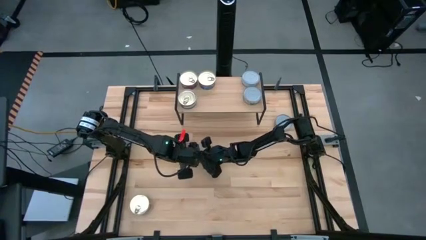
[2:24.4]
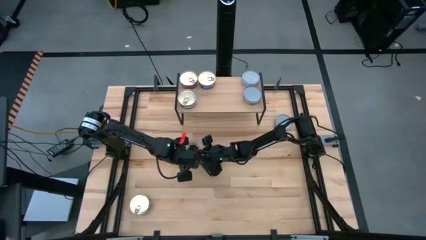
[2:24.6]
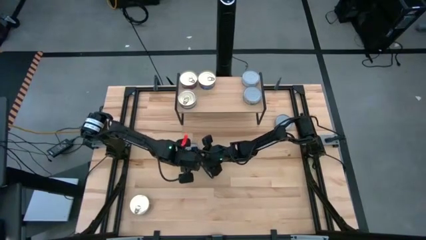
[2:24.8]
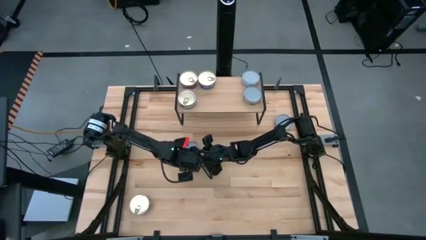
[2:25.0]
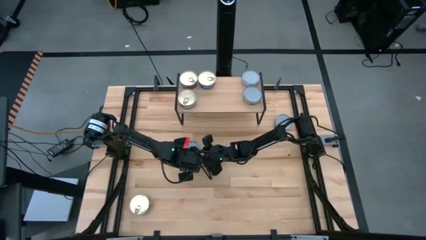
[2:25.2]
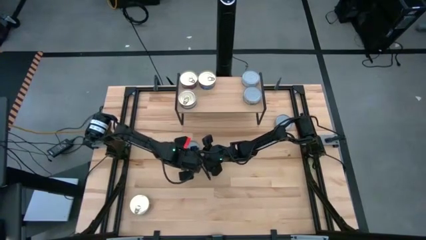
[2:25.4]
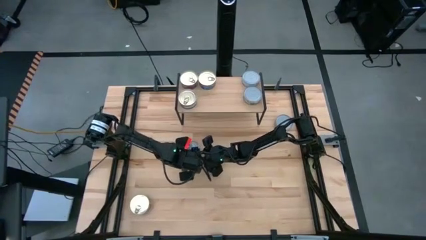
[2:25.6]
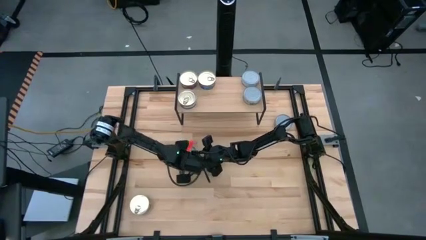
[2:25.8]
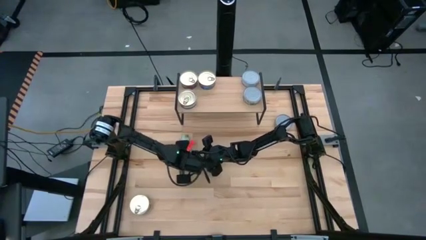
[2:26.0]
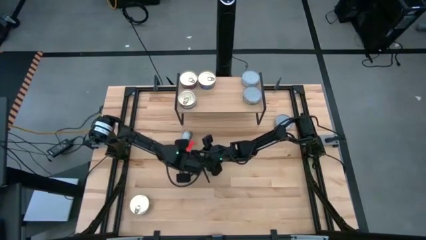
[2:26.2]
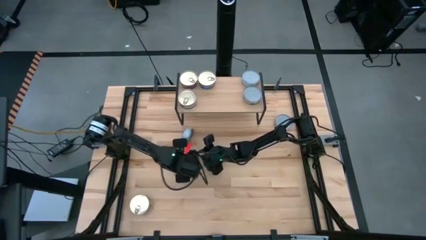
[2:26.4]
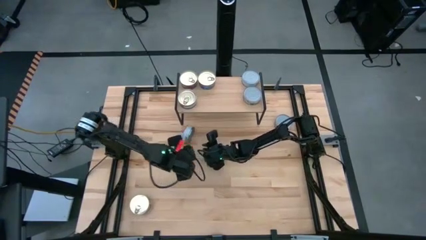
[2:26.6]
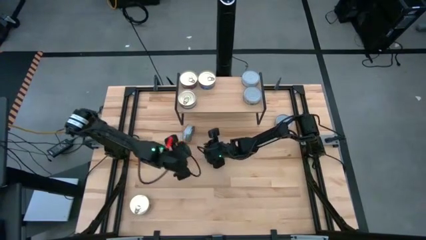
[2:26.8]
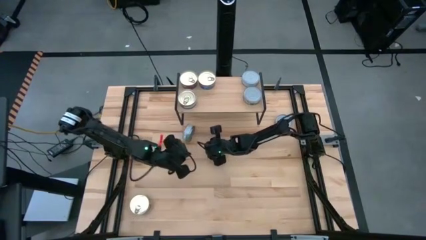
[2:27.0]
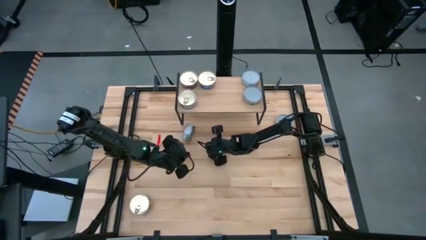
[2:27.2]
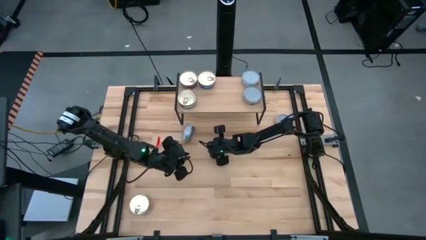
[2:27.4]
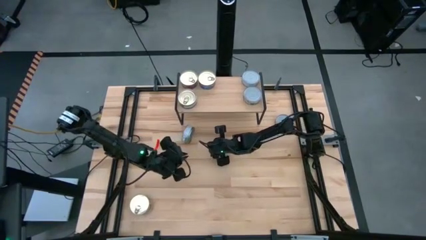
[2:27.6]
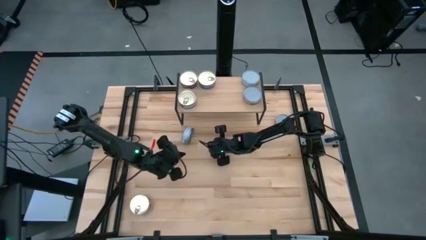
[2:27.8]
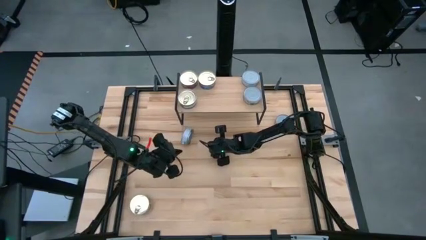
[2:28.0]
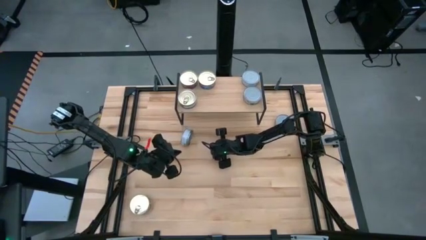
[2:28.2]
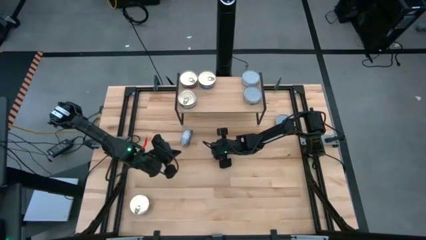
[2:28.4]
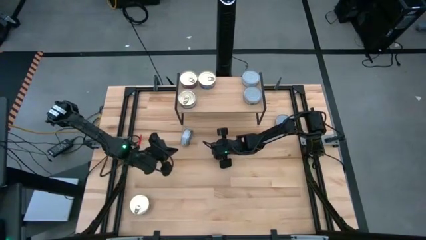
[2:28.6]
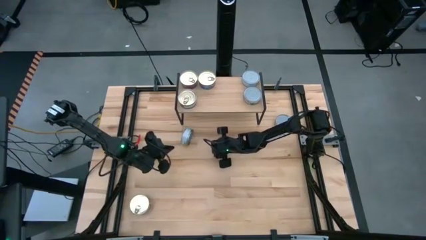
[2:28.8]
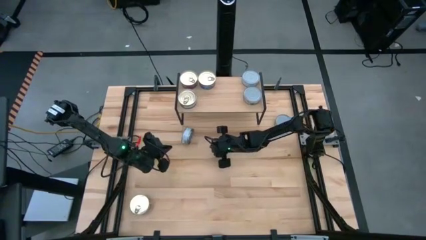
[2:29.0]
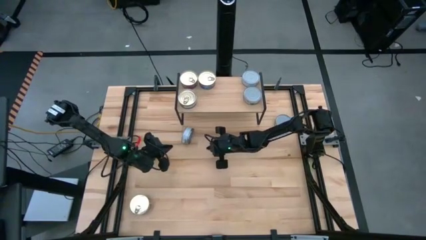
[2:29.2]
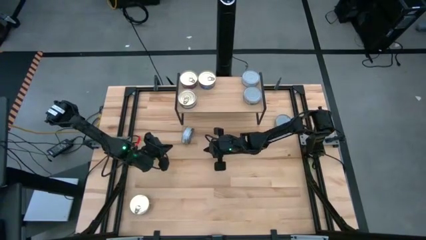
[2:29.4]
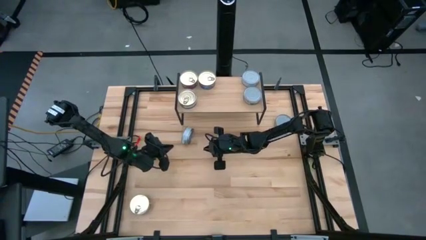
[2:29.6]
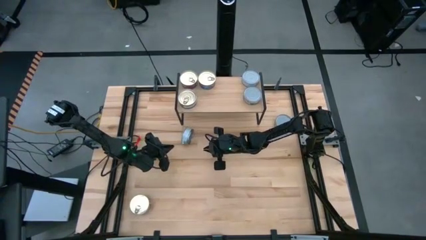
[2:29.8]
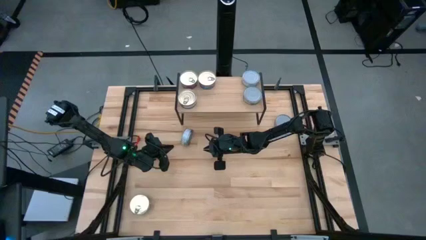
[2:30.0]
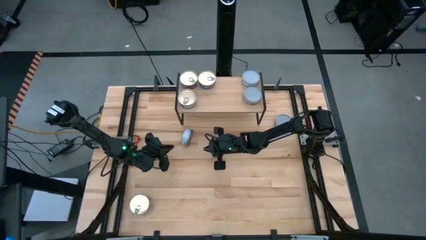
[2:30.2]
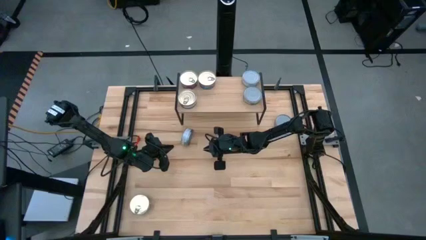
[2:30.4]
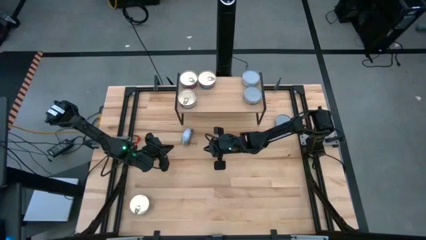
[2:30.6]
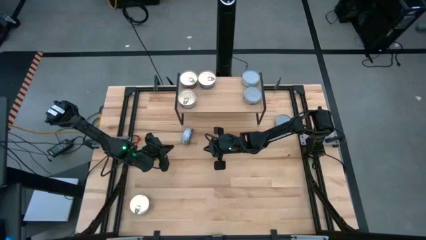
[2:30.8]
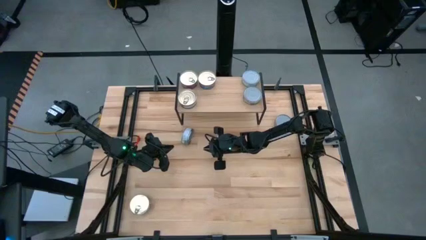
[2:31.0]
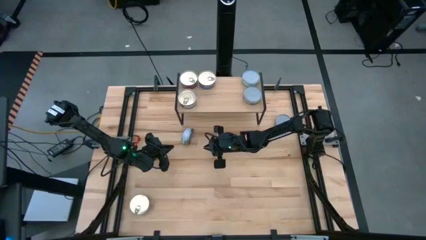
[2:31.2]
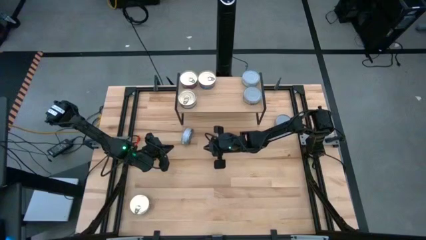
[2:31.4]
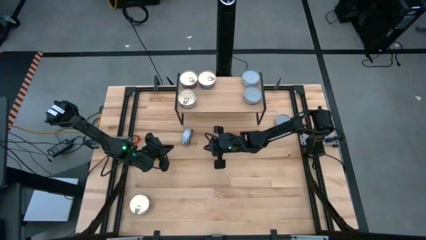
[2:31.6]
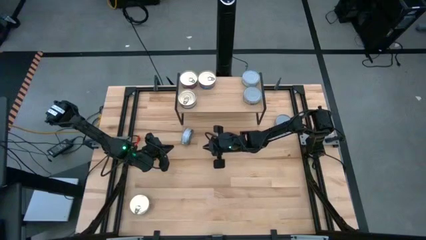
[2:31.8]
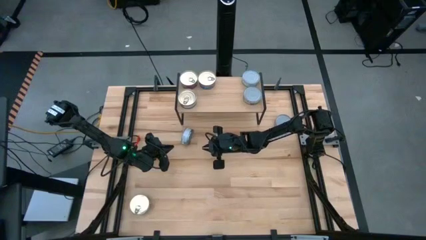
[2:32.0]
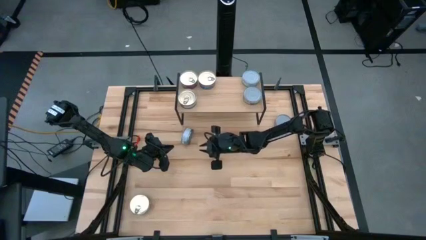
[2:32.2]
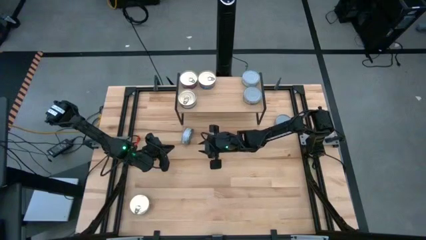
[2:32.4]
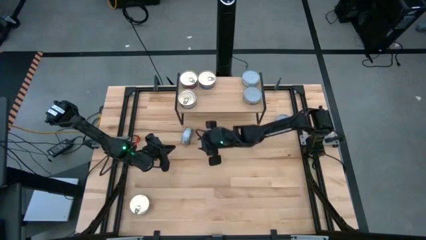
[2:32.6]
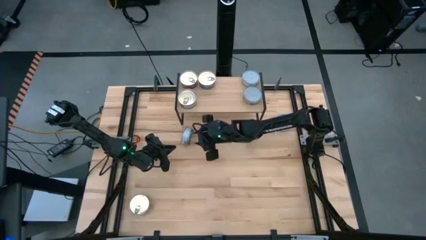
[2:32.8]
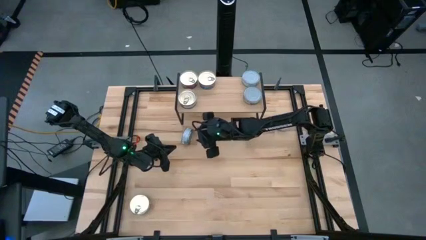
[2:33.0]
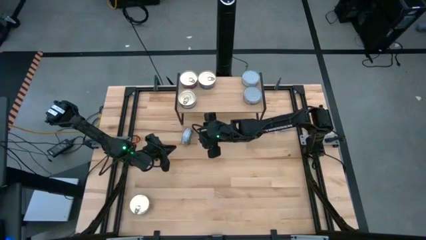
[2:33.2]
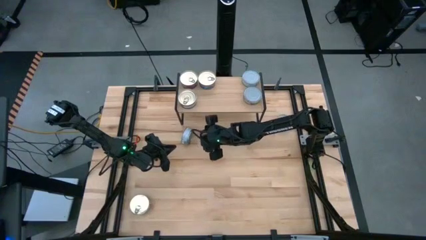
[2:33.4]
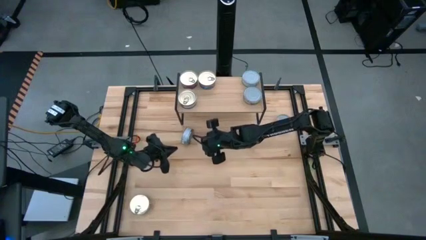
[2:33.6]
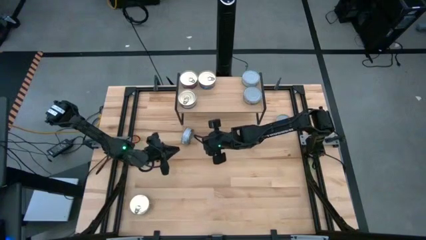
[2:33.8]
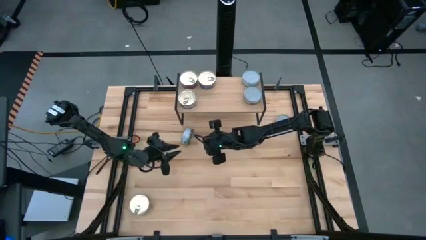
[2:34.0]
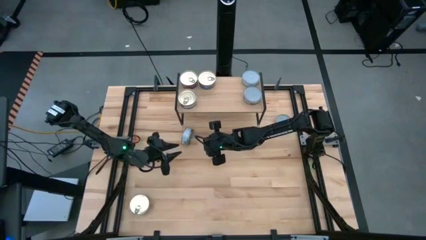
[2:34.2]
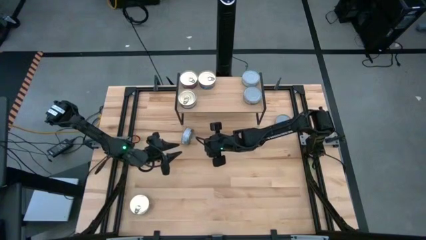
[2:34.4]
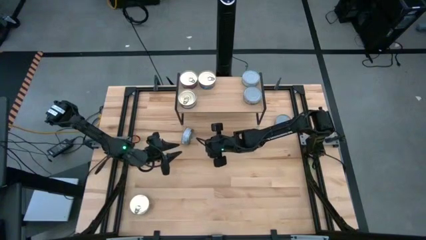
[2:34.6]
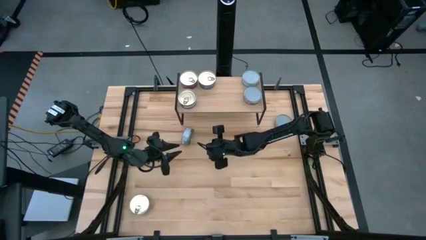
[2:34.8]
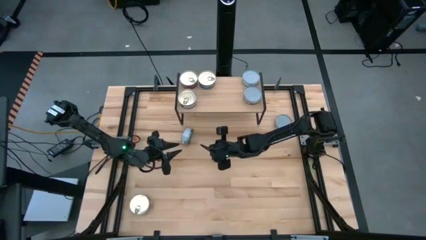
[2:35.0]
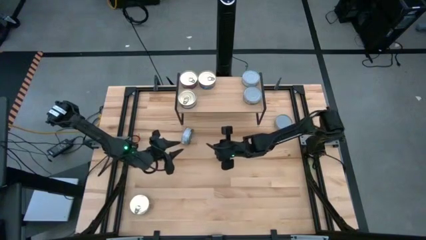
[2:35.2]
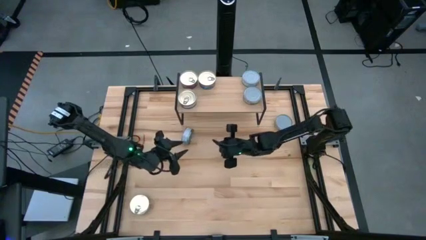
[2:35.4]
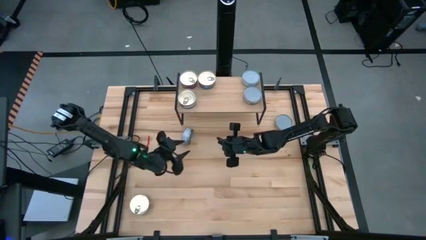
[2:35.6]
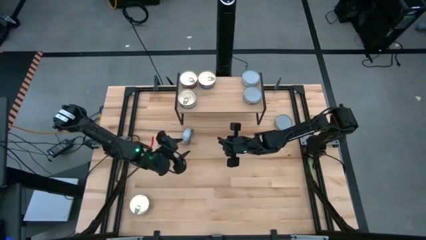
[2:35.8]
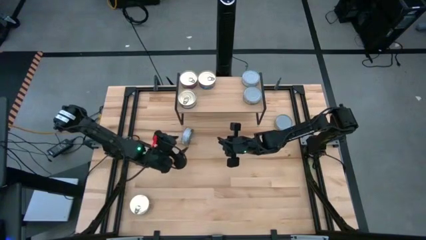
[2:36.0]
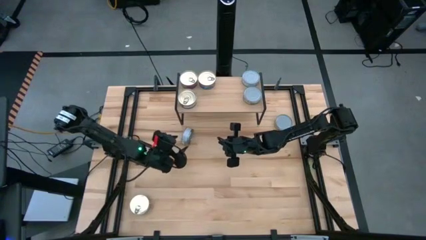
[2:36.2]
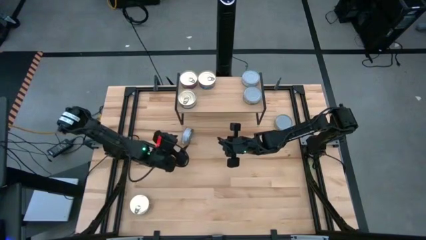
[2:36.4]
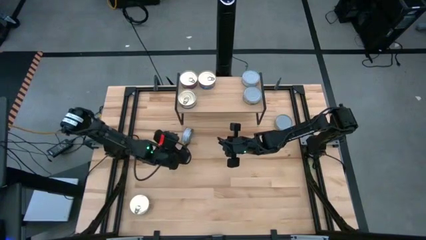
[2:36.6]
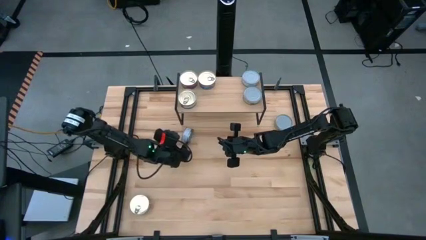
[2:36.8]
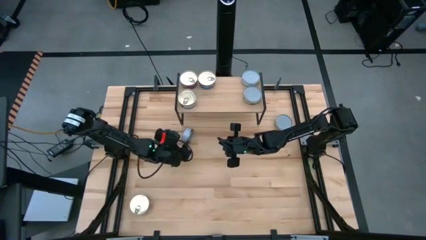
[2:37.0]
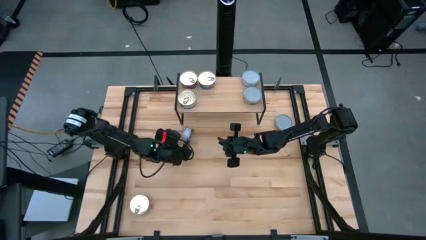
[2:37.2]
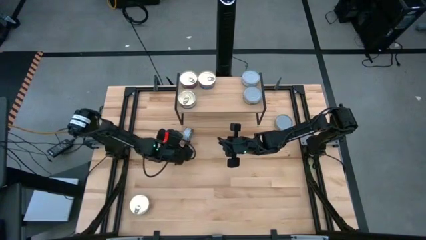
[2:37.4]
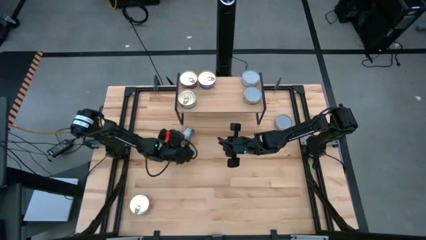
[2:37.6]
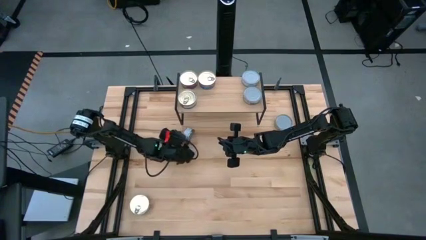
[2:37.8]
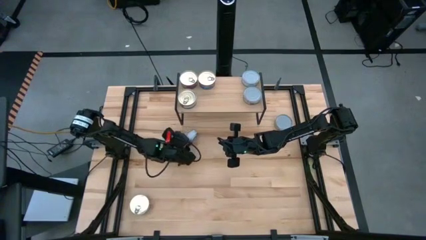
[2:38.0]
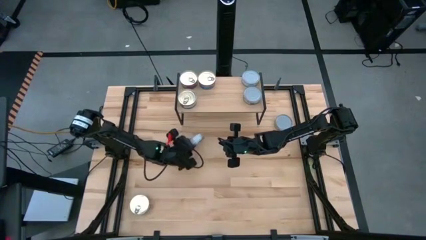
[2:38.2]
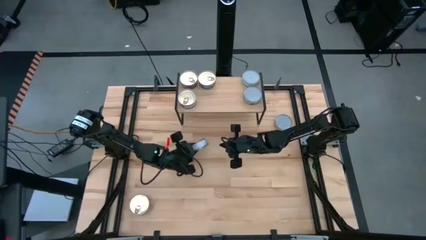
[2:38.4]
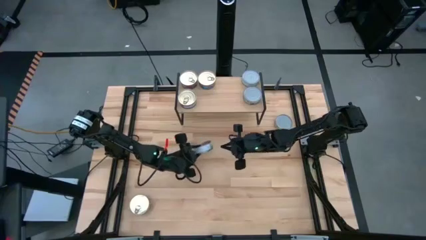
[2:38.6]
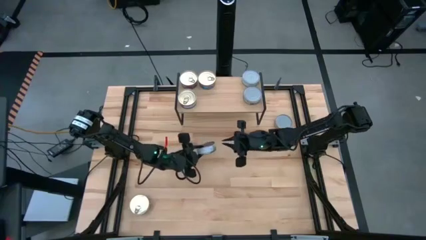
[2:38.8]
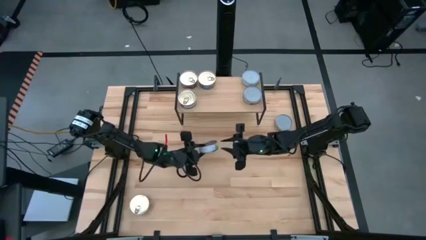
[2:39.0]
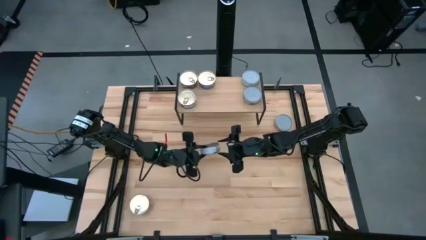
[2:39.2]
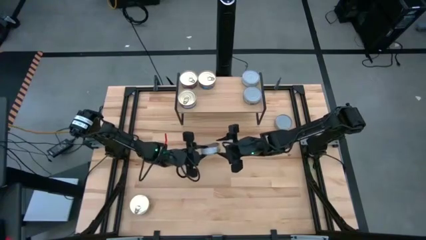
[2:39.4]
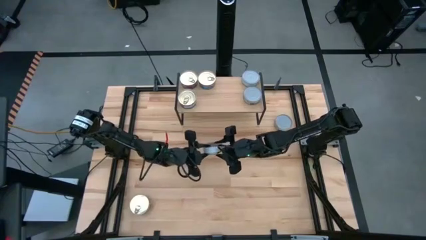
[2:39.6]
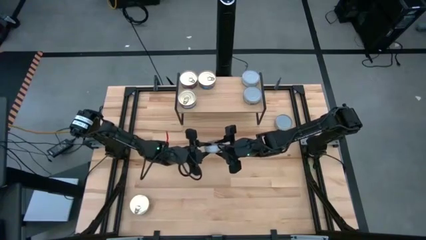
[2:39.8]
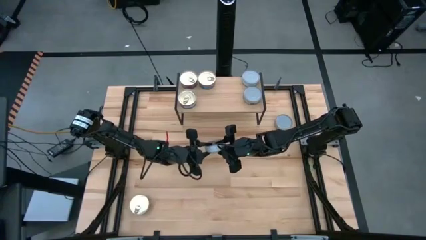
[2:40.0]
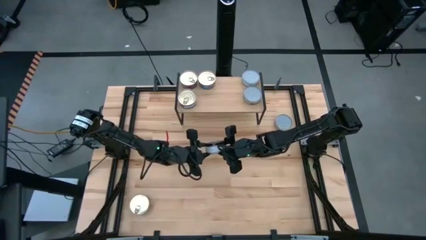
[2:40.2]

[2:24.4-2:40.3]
Task: Stack canned seafood by type on shelf
Put the left green tuna can on the shelf
